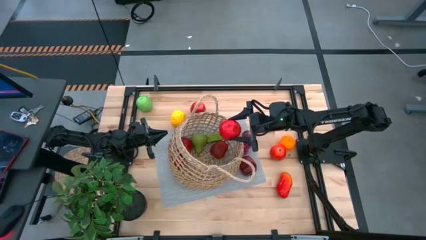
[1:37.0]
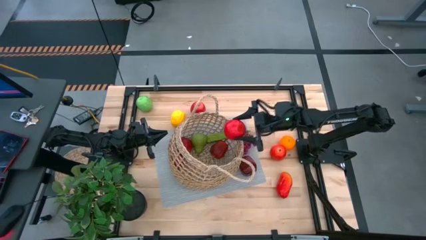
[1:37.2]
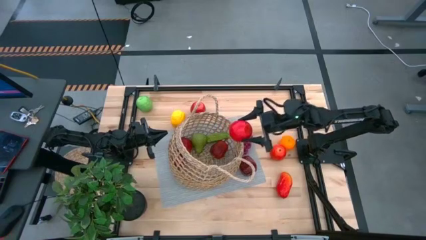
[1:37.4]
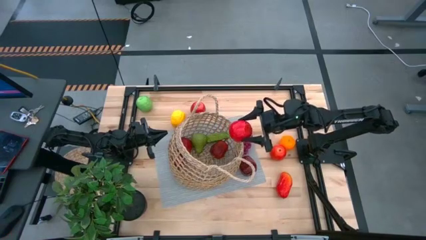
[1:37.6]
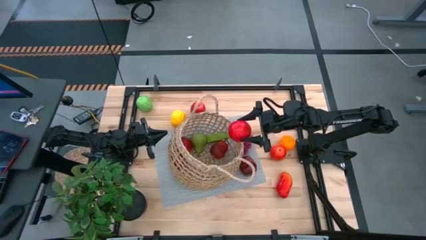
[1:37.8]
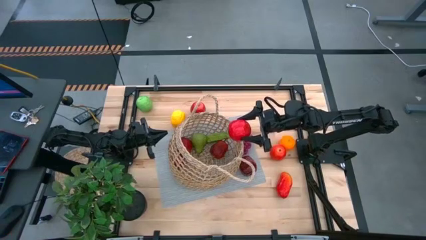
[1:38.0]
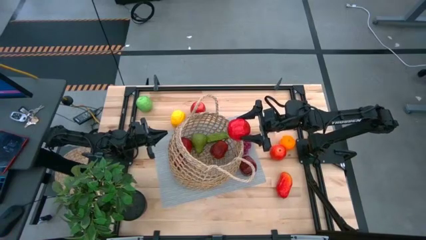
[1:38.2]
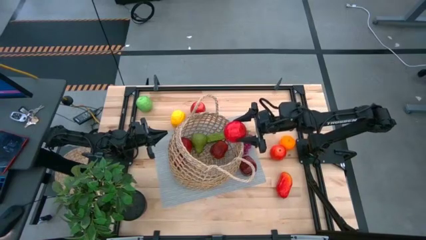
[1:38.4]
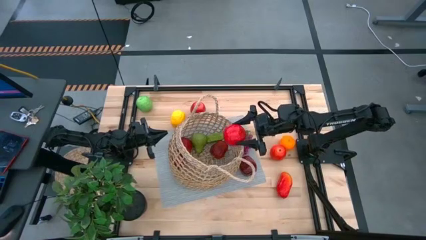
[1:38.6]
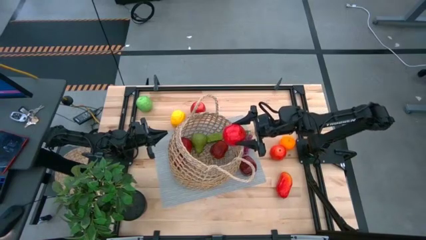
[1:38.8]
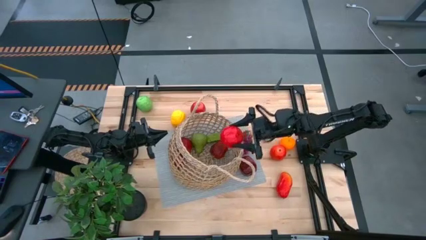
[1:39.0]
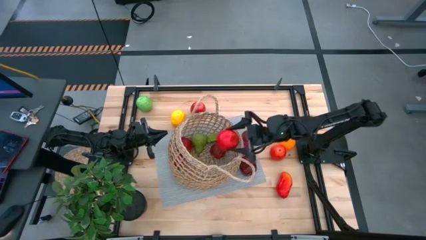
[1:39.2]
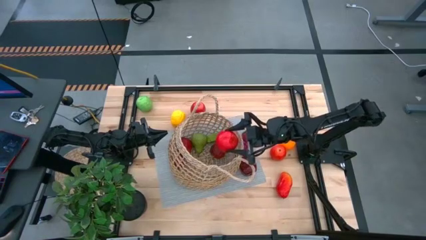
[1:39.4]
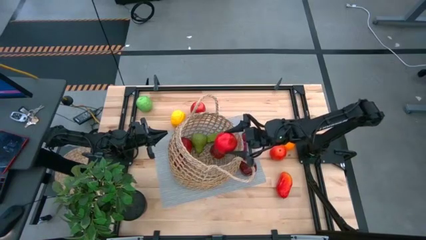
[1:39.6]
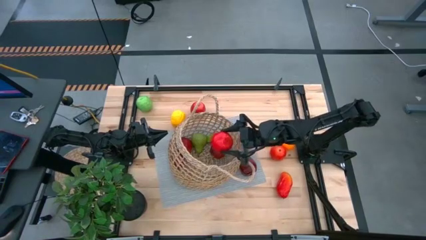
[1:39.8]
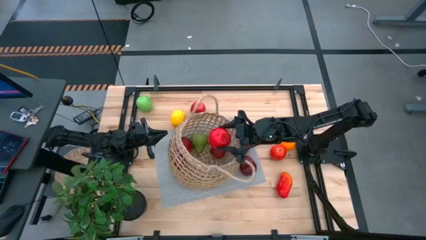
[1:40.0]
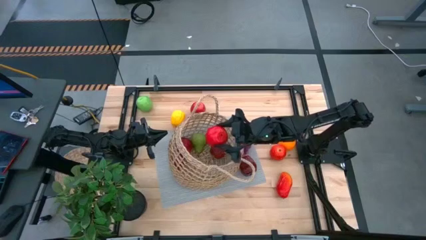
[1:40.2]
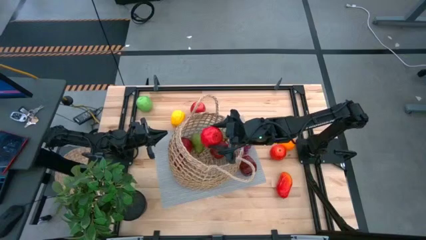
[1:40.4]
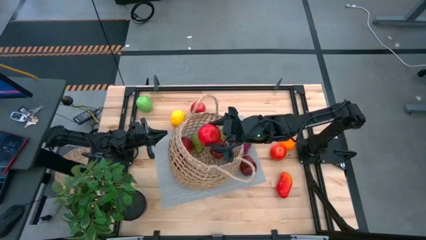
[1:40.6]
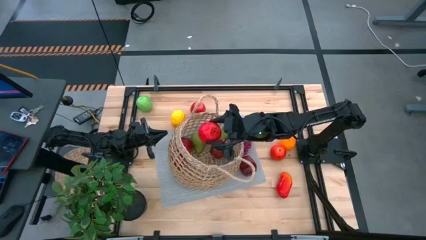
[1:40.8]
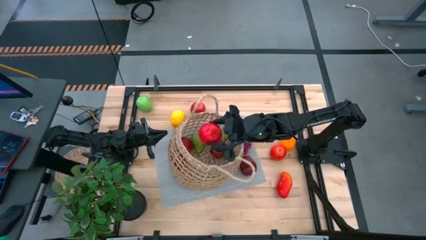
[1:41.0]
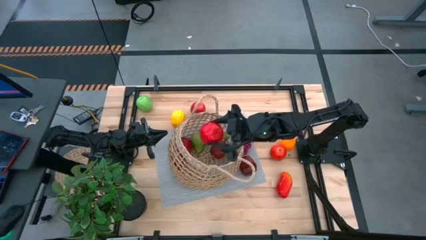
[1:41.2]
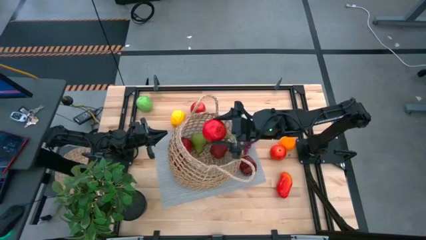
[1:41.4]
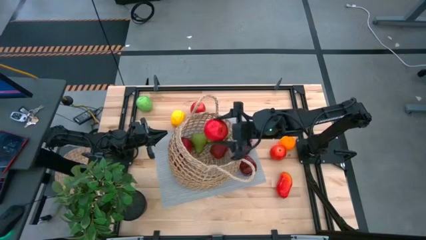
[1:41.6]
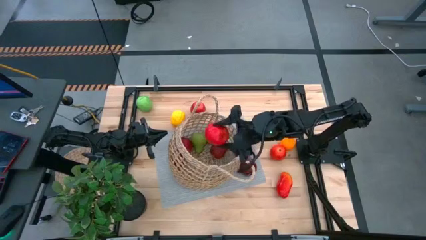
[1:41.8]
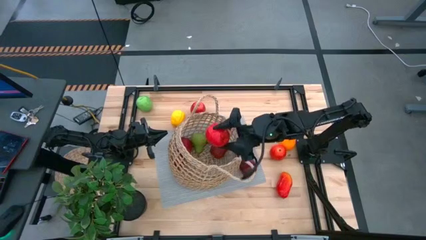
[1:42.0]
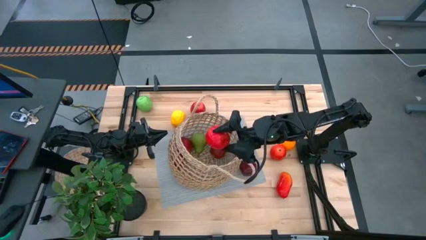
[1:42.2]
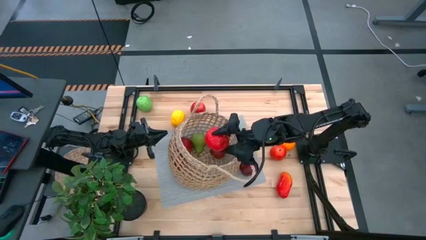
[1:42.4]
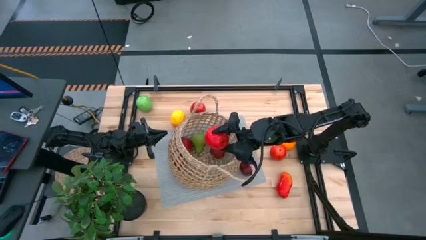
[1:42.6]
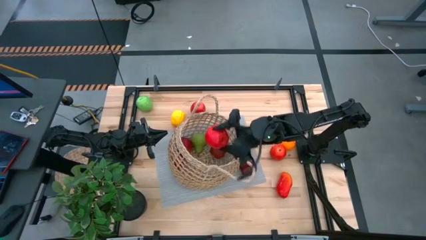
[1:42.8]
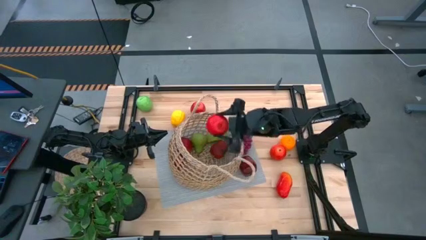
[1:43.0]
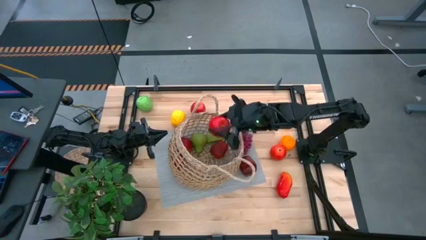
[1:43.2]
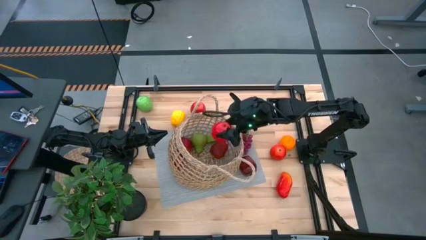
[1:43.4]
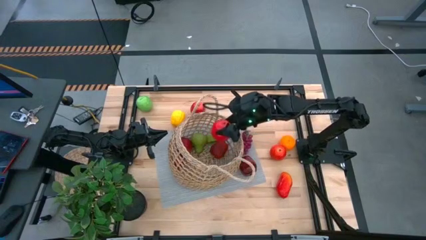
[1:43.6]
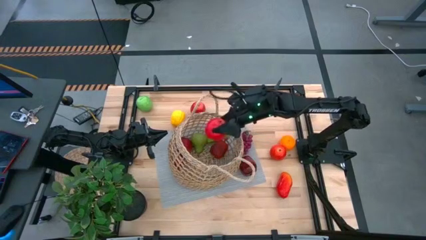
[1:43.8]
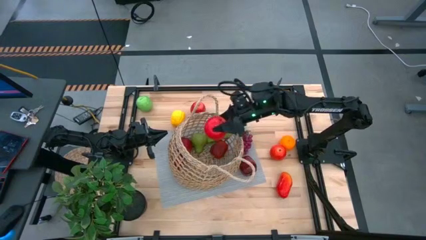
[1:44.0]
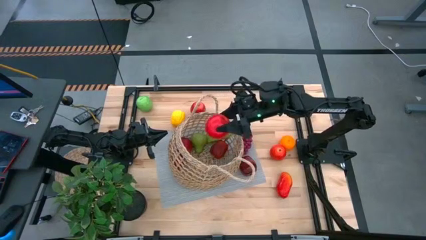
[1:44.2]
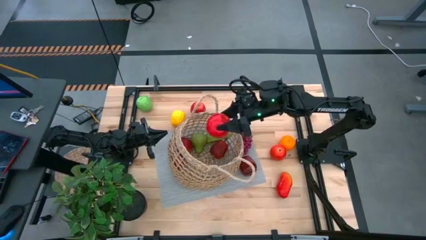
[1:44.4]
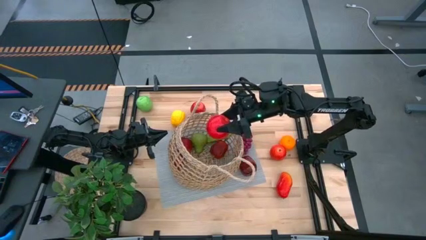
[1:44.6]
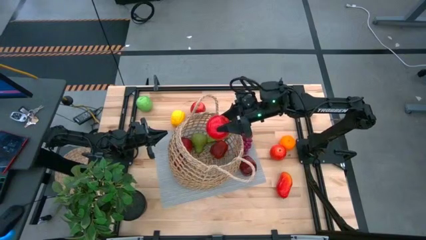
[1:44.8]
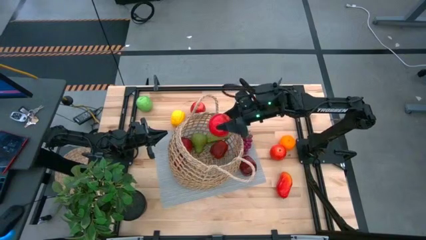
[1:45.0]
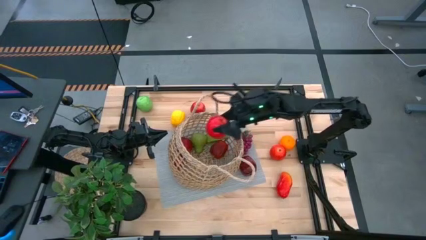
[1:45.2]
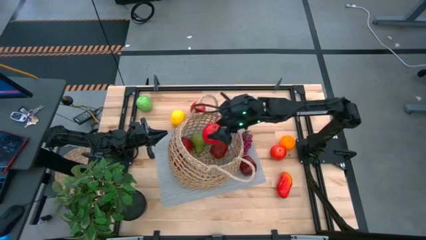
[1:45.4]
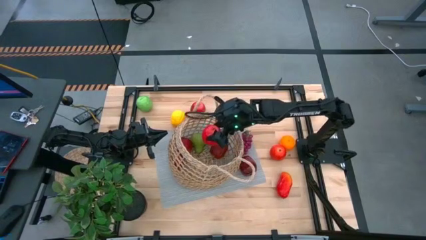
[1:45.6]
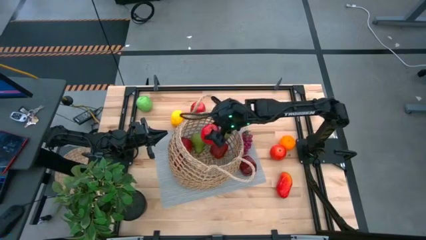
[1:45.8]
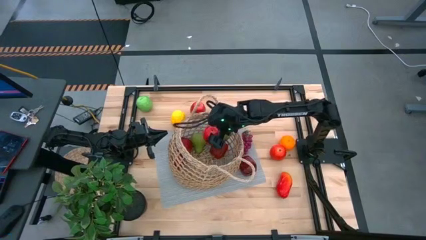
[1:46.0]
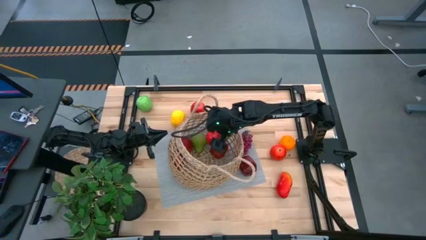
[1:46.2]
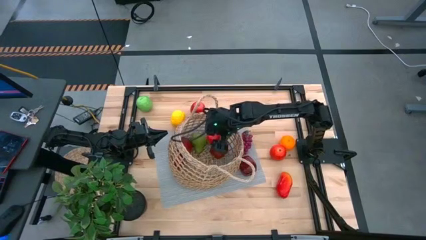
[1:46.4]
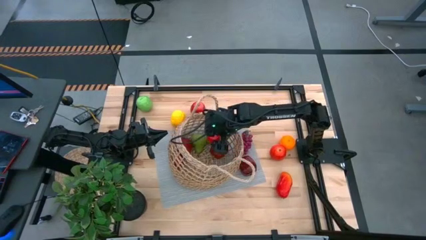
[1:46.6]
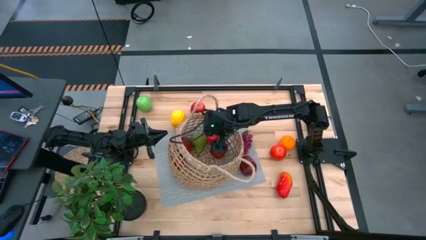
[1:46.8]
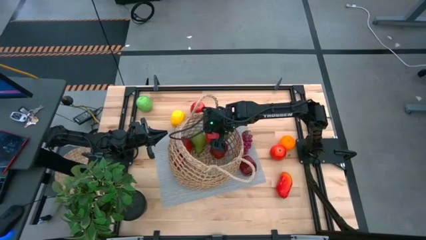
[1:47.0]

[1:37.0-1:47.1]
Task: Build produce basket
Put the red apple into the basket

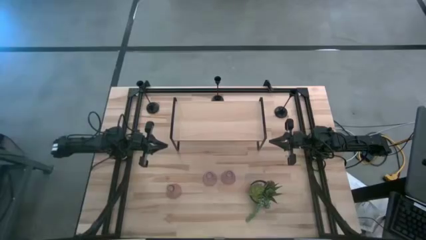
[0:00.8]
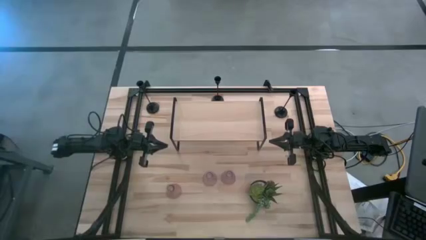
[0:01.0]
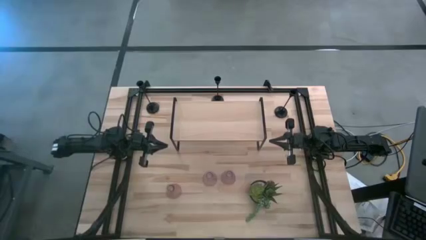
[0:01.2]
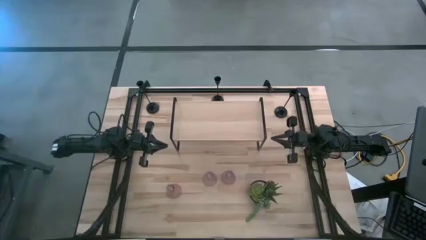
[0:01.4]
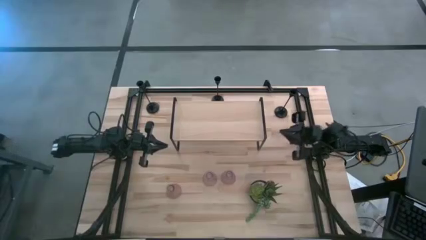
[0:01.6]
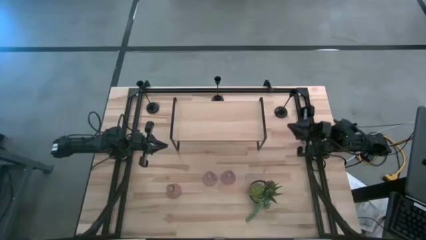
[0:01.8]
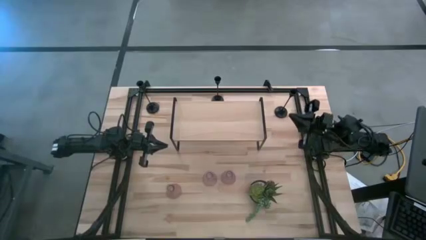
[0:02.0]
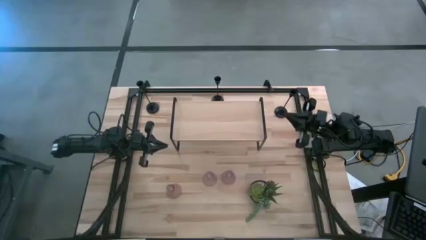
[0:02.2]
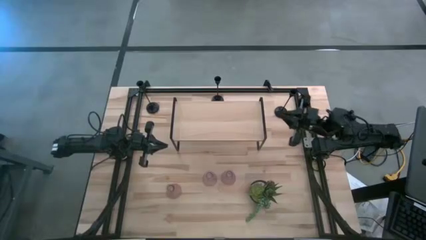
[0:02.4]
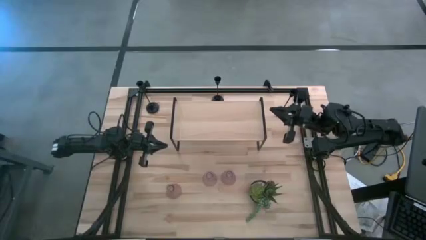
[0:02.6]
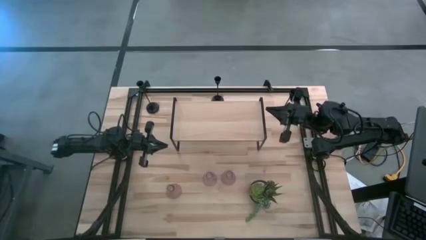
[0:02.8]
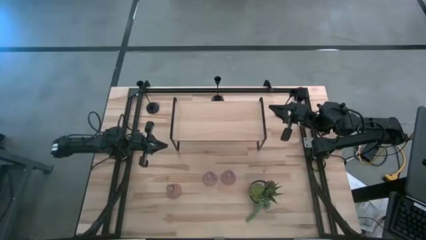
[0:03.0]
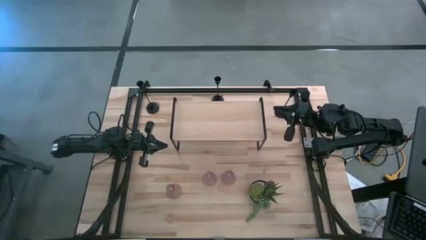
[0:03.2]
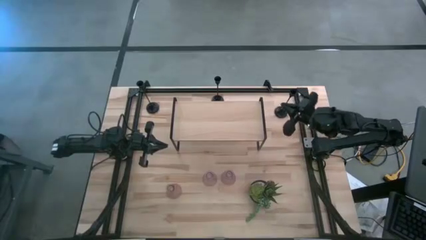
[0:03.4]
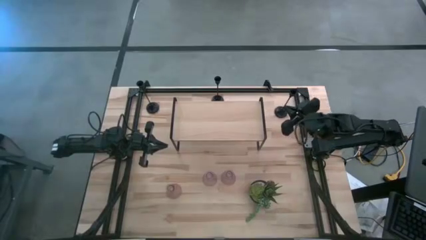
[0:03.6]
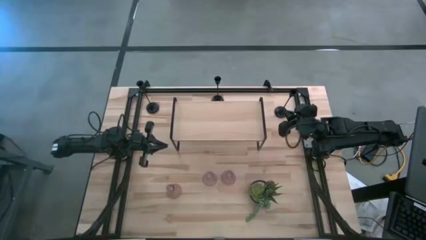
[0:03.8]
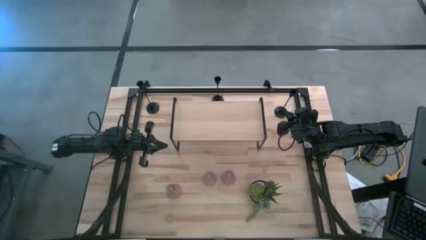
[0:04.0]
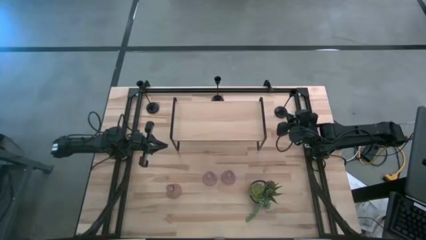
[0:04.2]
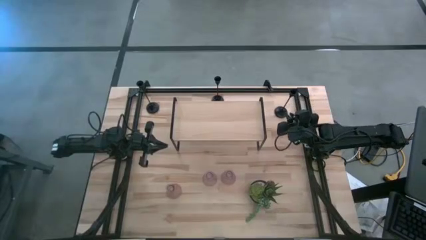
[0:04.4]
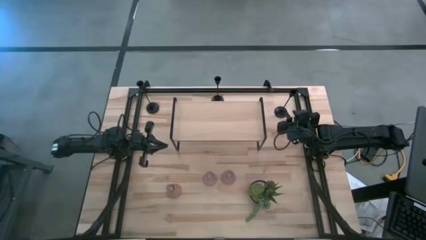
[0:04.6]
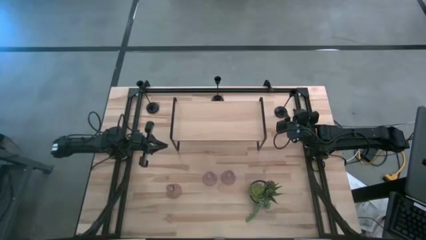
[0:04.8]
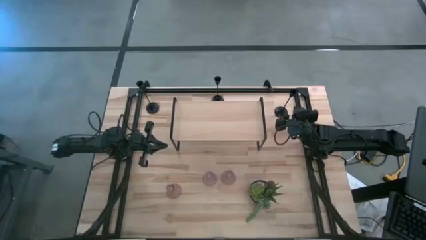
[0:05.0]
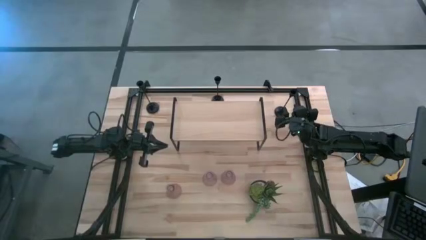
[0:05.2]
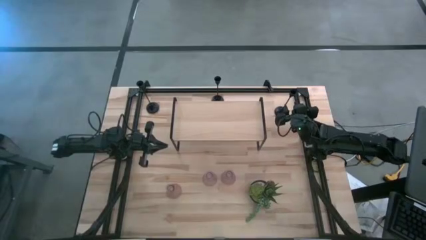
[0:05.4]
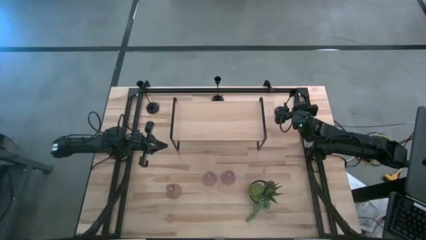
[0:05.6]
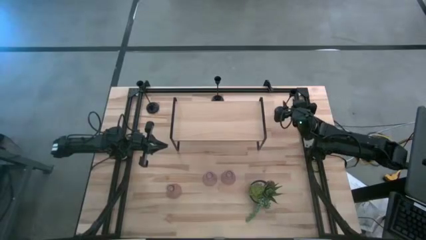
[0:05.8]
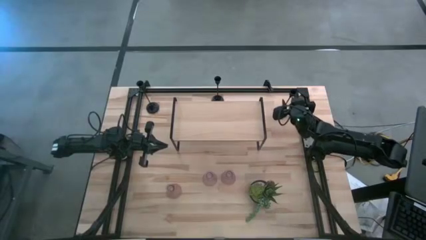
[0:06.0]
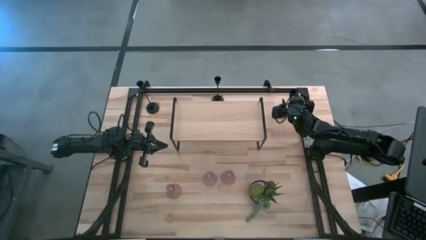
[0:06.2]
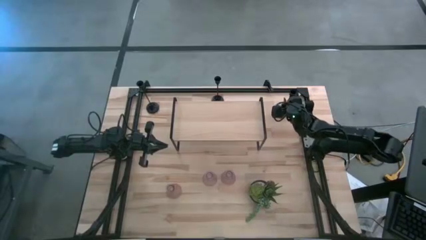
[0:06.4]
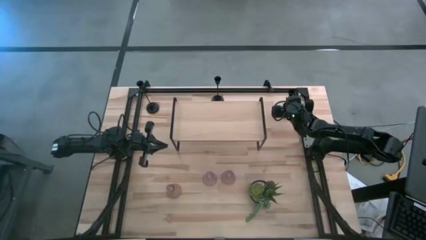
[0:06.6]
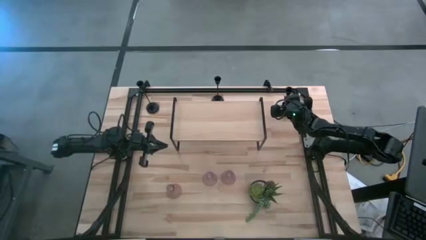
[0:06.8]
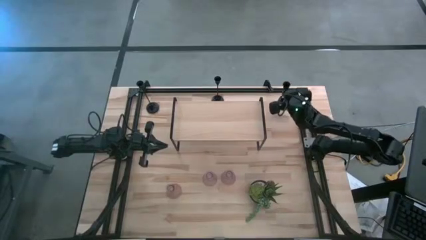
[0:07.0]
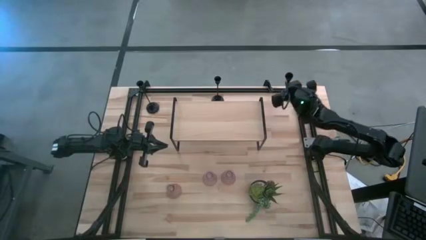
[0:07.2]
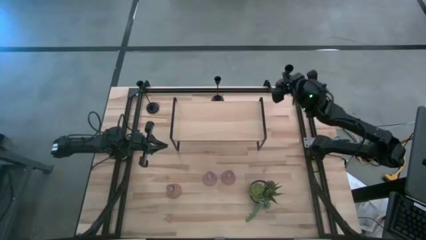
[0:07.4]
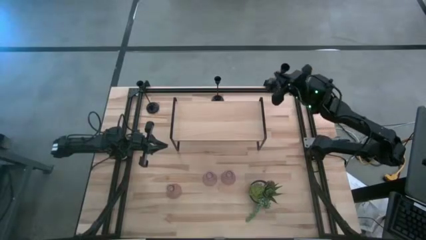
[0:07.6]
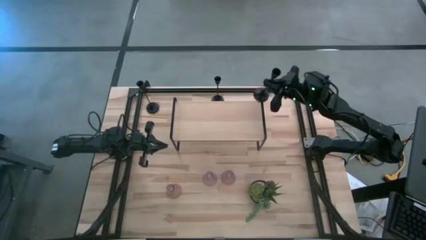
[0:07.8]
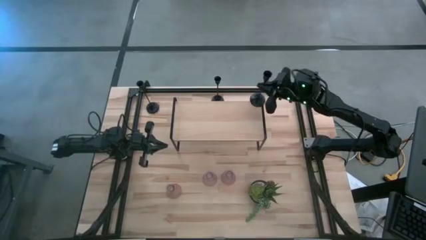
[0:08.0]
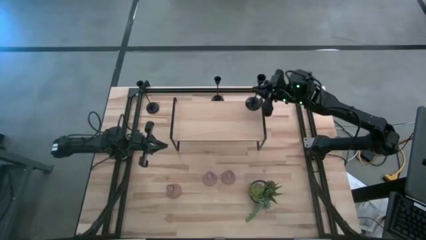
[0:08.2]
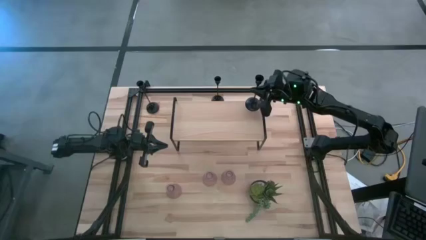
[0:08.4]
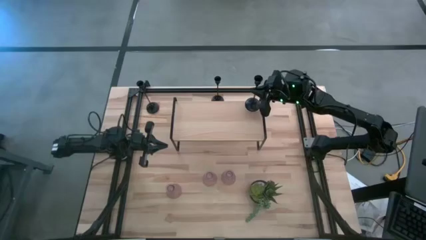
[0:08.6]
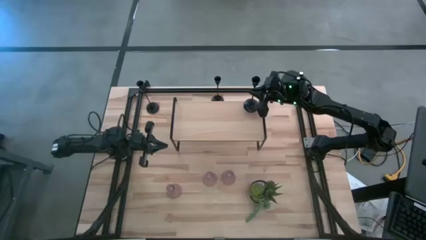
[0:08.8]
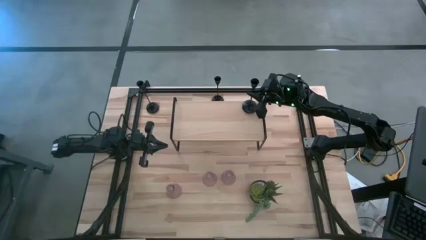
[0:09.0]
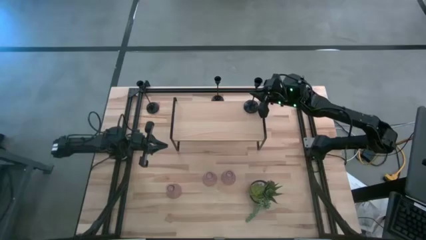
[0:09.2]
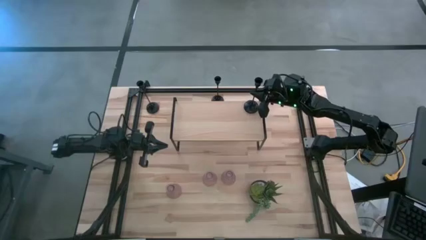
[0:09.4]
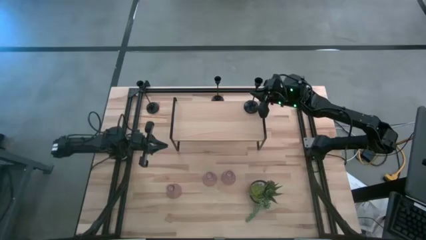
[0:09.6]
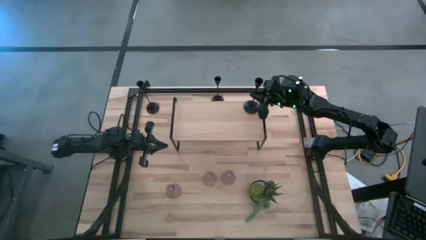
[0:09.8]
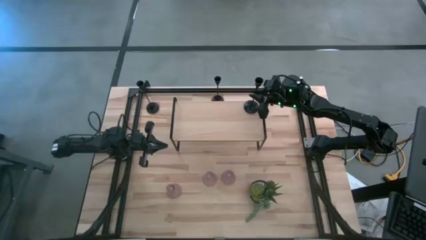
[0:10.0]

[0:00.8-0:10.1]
Task: Pick & Place candle stick holders
Put the right black candle holder on the shelf
